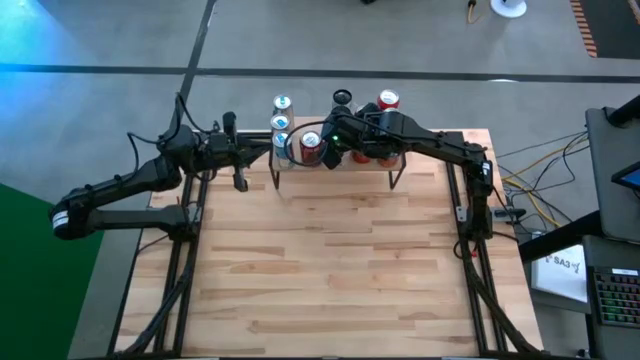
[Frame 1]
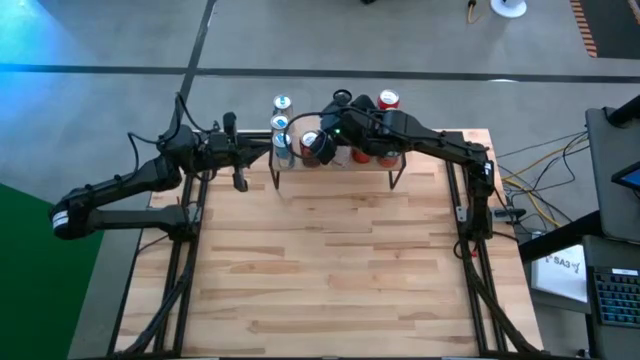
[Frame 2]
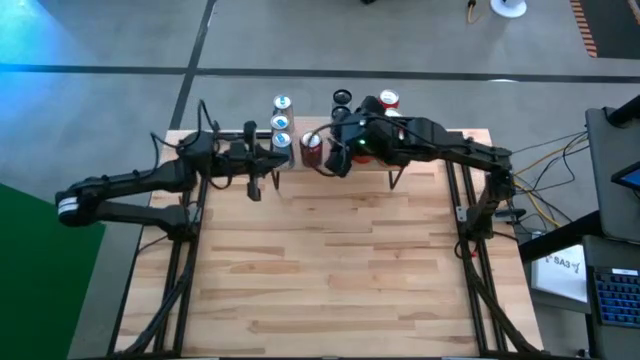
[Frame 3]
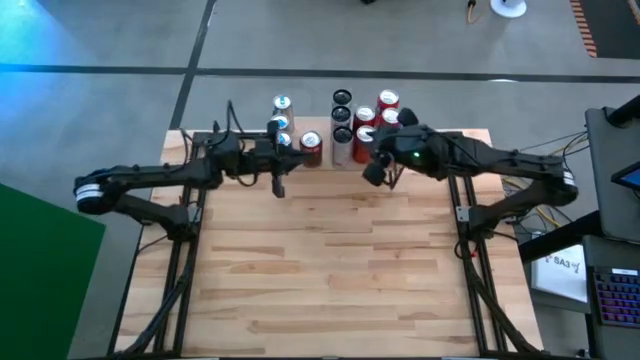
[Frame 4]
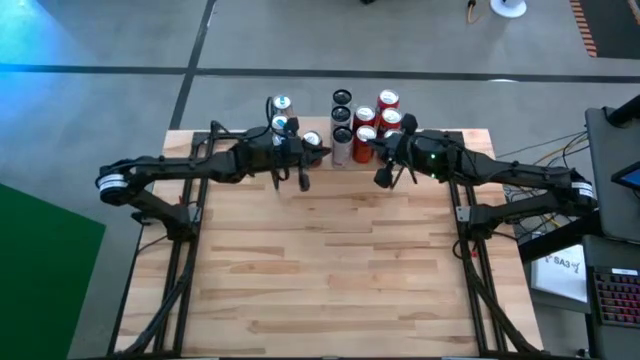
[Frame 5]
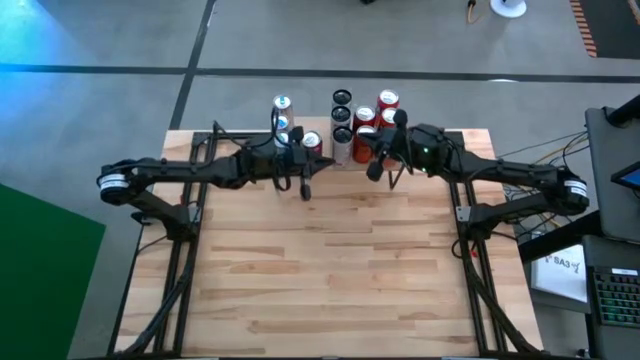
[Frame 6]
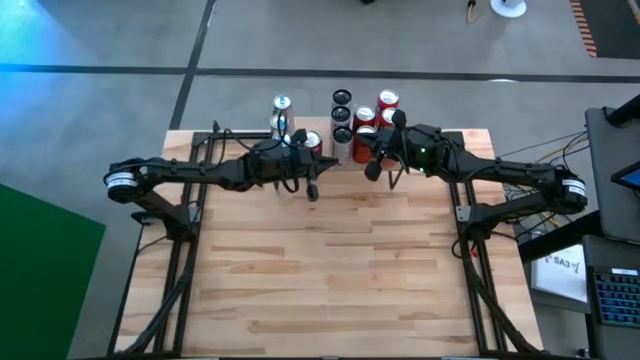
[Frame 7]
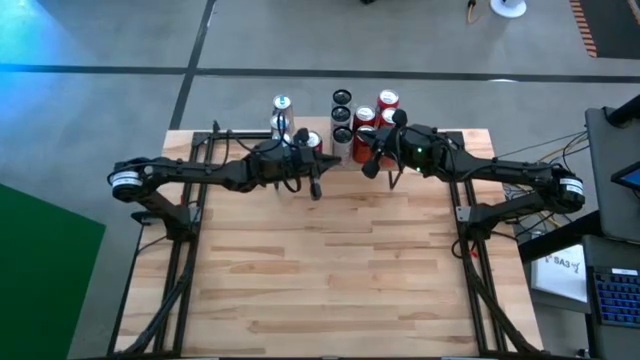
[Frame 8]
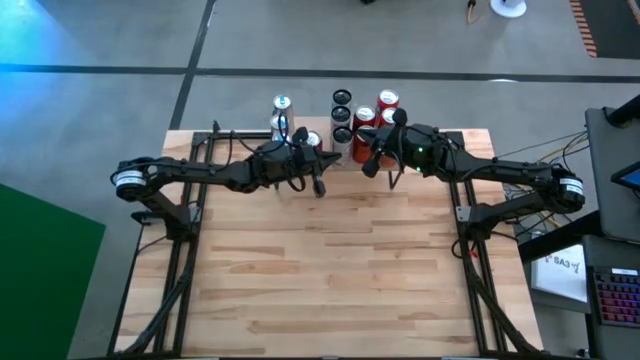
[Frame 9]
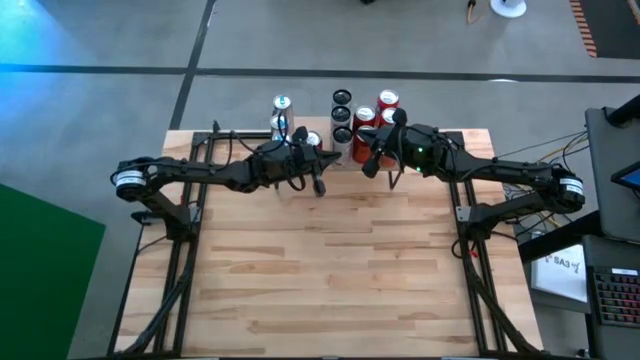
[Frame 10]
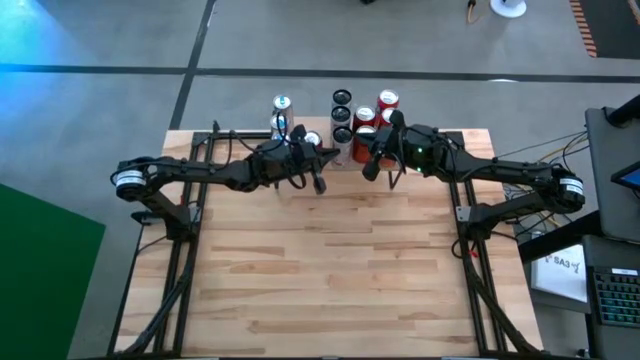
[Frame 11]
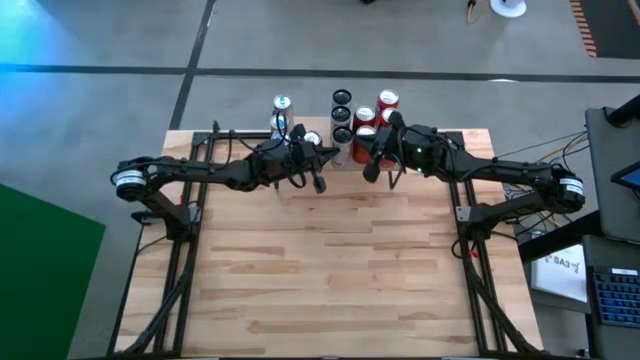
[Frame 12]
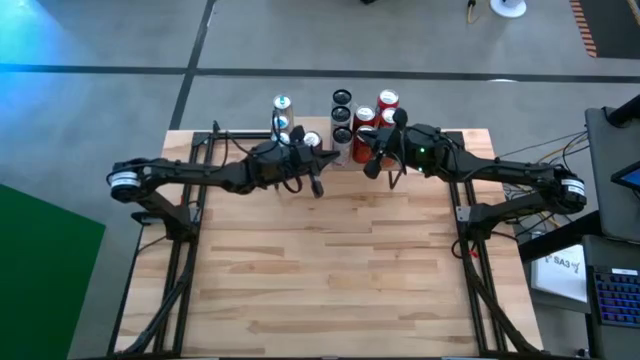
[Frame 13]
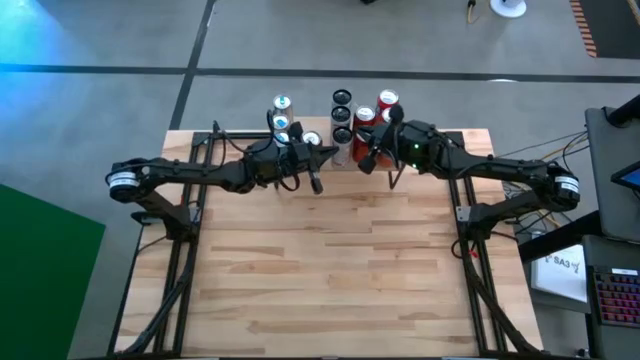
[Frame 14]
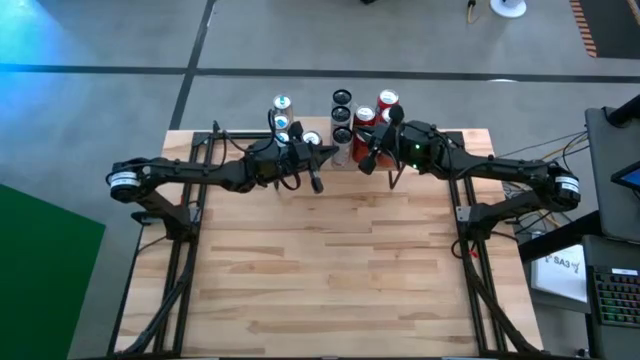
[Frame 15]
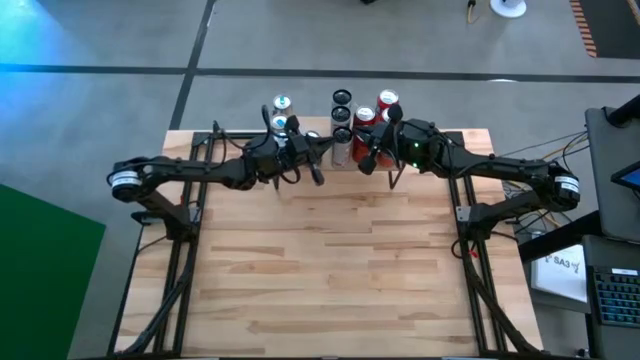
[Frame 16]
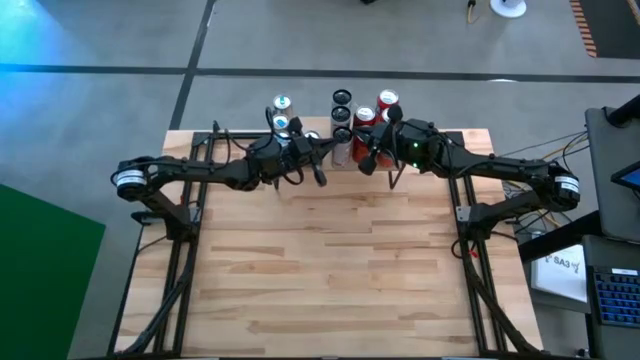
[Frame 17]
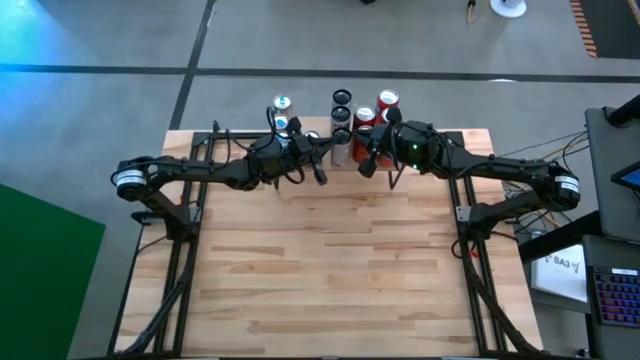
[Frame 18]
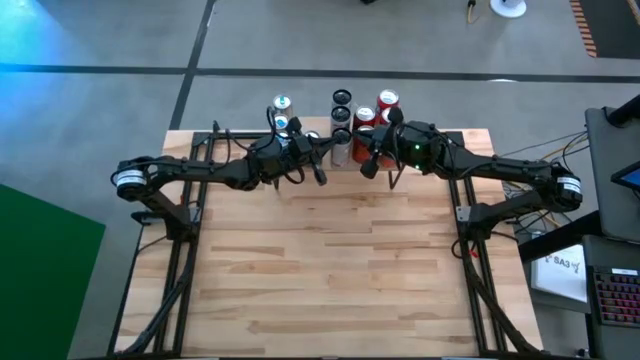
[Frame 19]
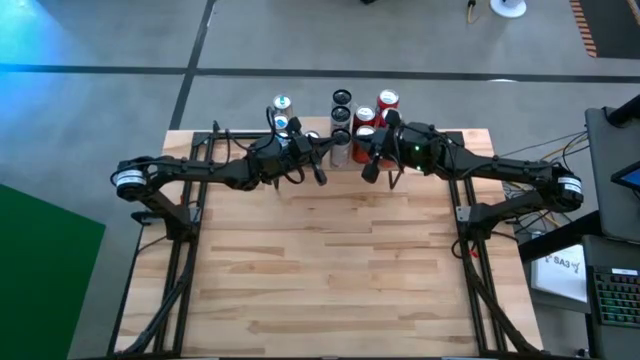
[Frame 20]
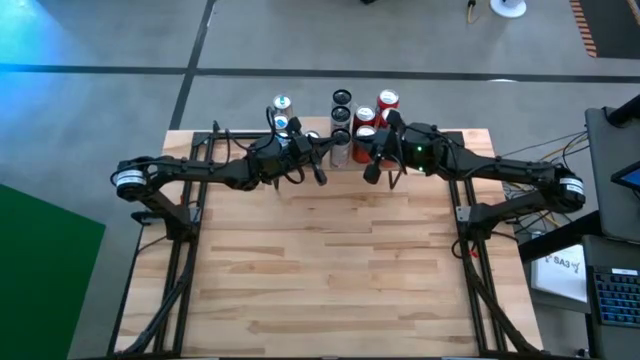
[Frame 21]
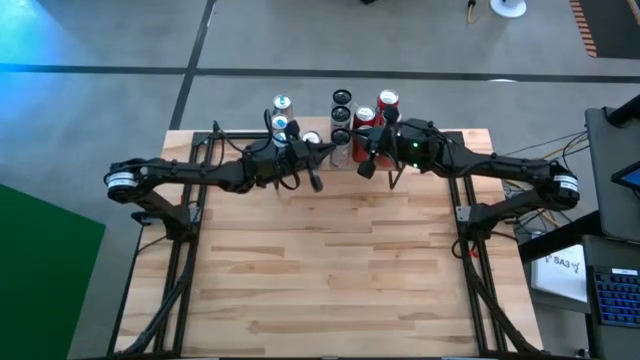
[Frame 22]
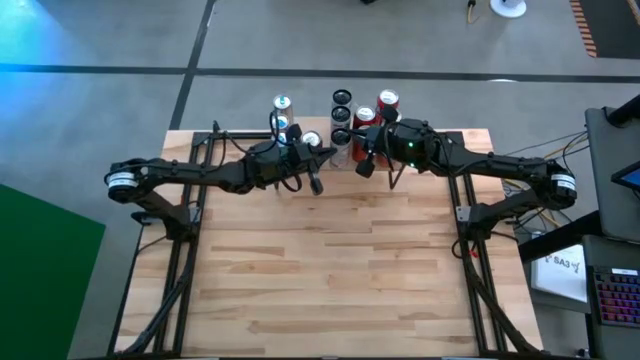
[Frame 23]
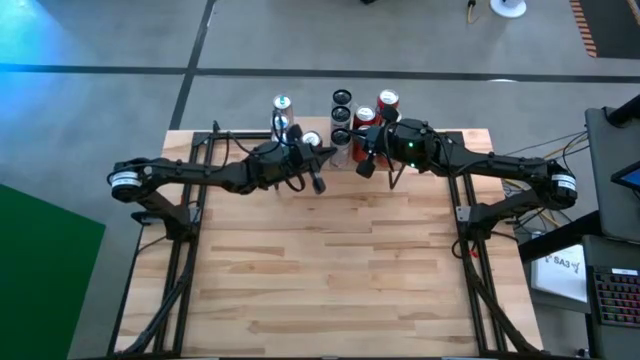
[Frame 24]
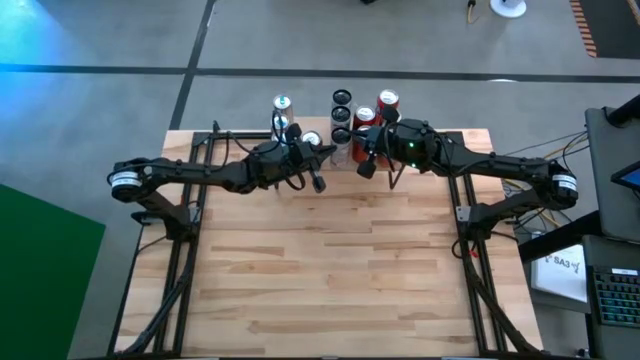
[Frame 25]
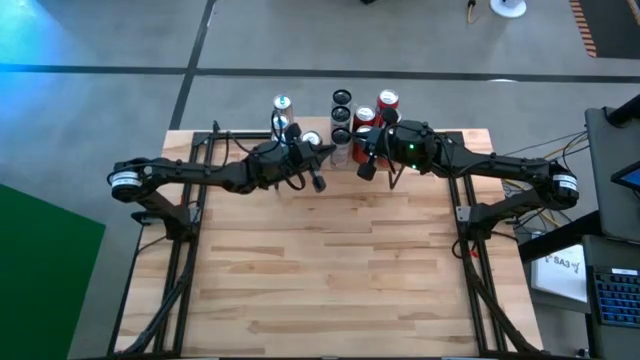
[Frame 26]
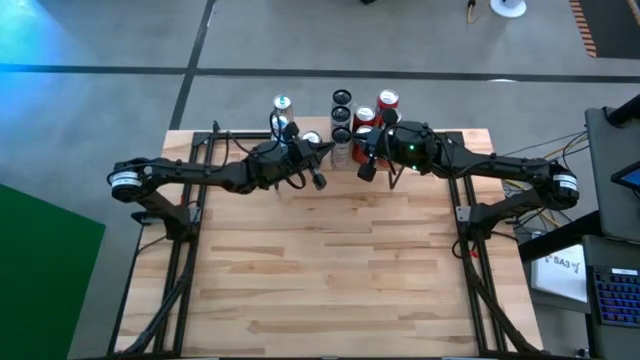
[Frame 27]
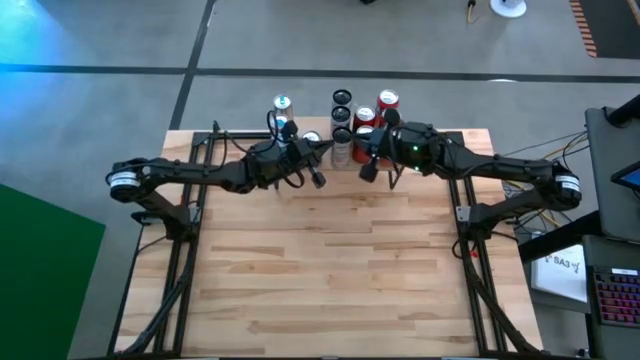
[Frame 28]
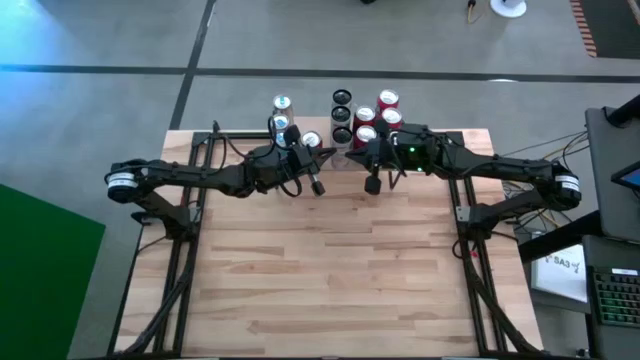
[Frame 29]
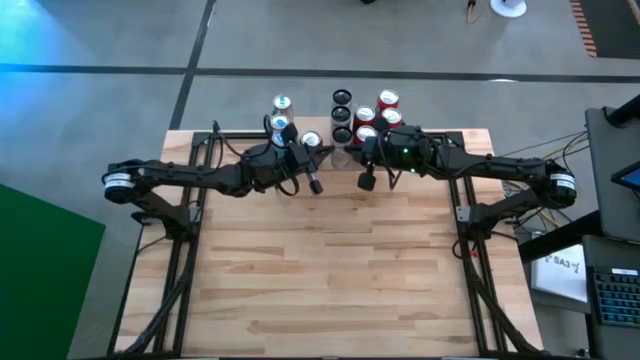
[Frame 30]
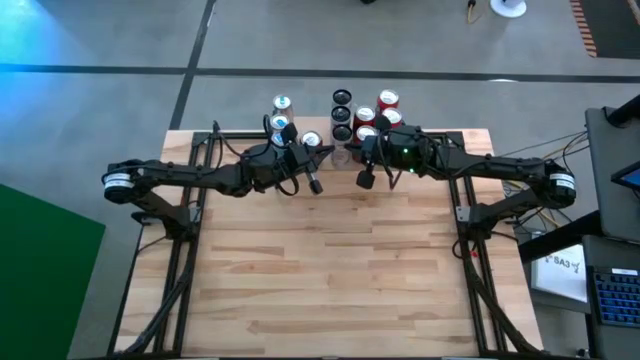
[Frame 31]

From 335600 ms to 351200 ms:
Task: Place canned beverage on shelf
Put the white pink soda can on the shelf

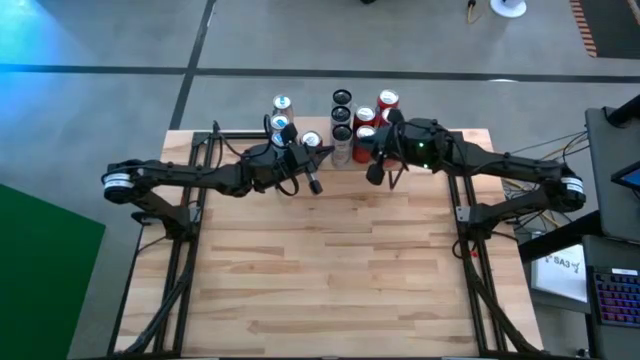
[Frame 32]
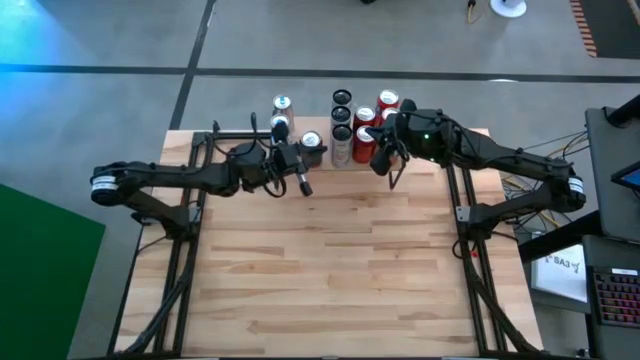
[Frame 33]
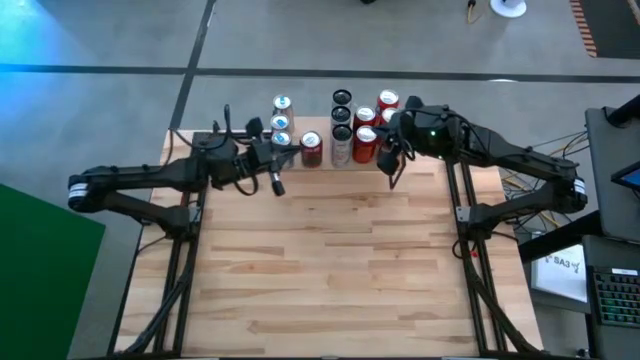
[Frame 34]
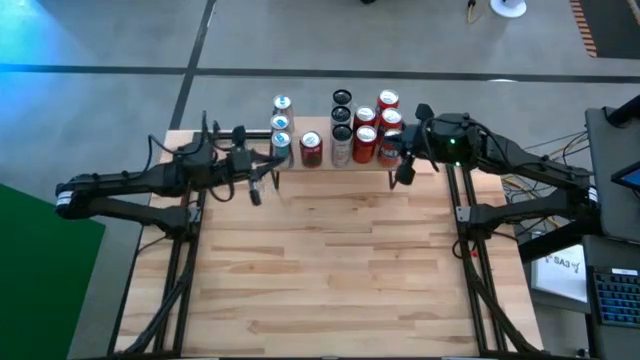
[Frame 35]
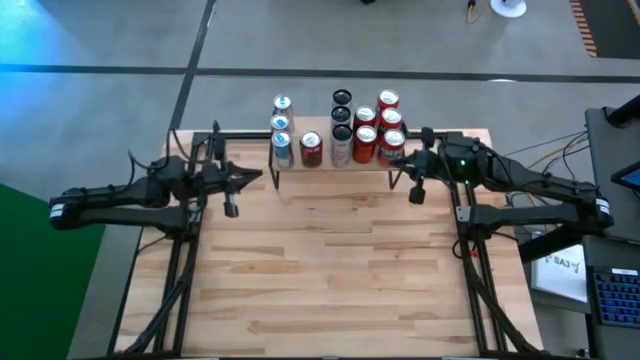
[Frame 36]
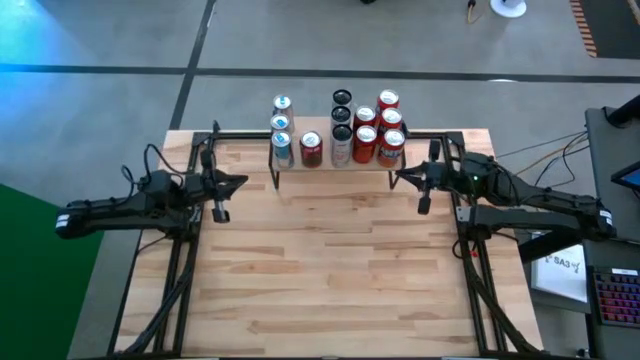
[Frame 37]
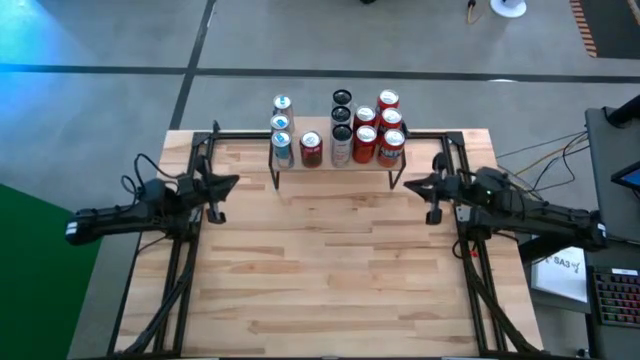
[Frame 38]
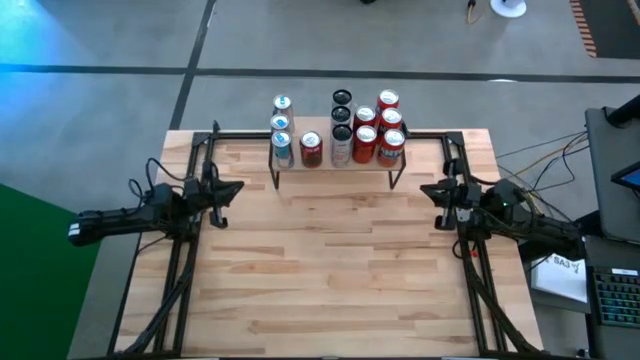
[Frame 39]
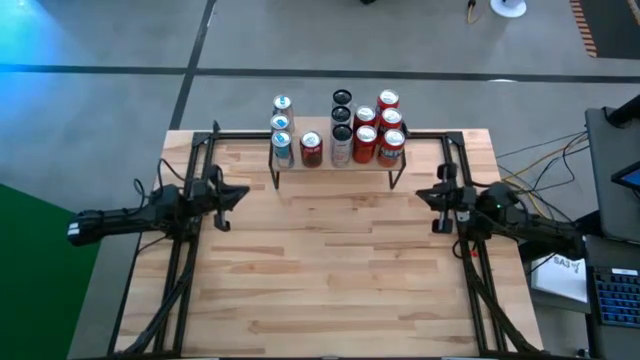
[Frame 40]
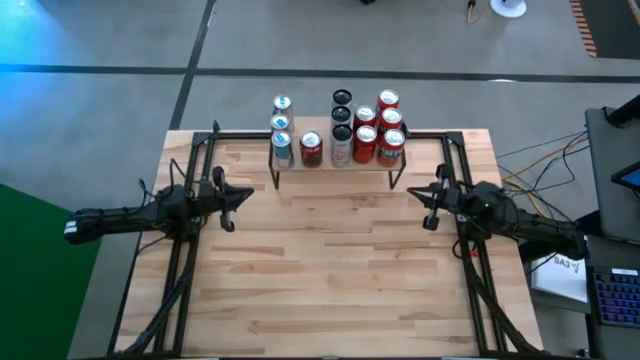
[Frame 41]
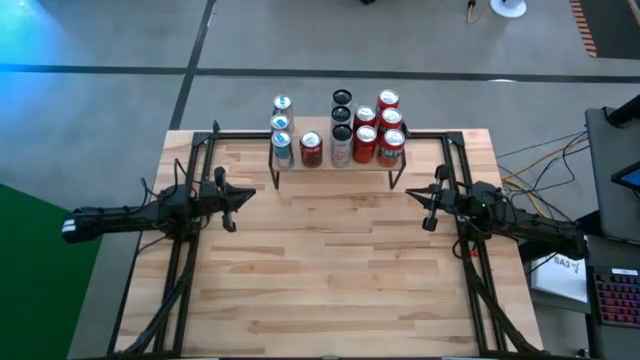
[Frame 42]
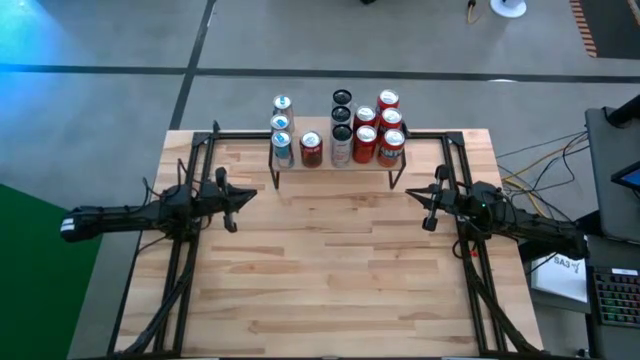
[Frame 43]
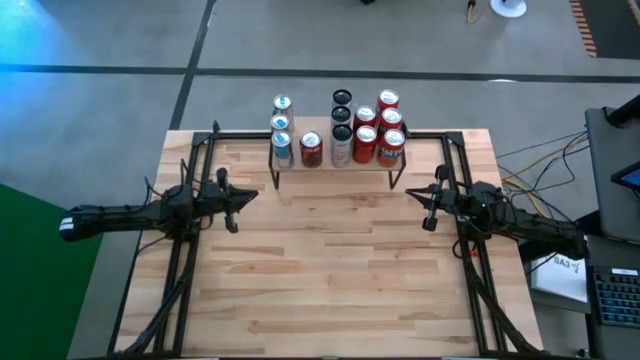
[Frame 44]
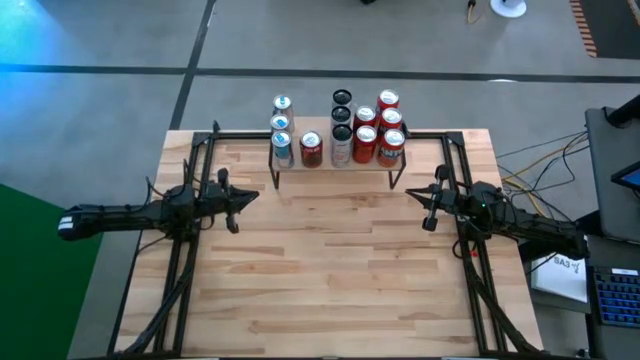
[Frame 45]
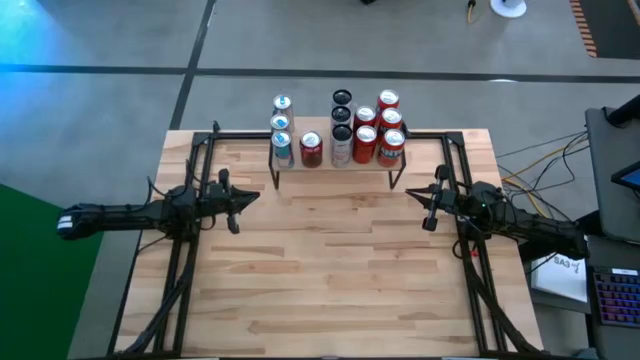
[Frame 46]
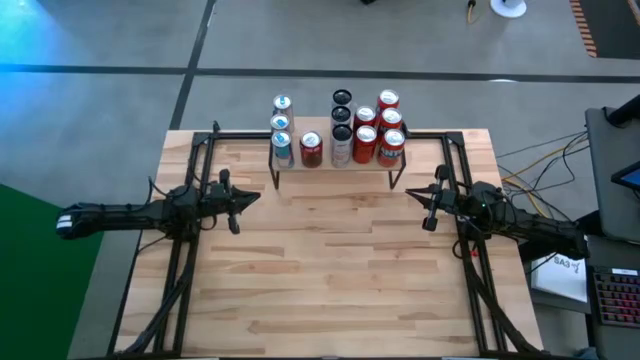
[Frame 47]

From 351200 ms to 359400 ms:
Return to Home position
